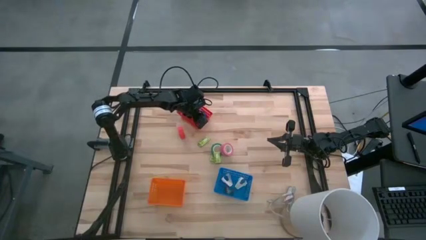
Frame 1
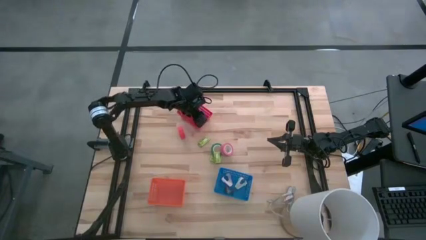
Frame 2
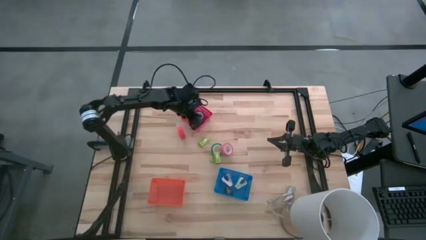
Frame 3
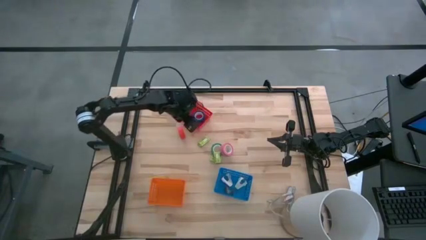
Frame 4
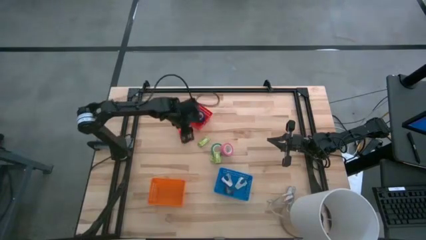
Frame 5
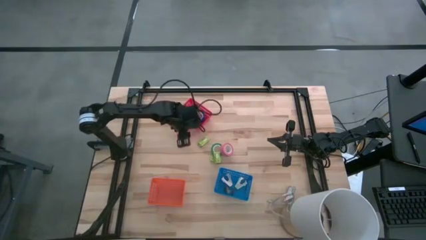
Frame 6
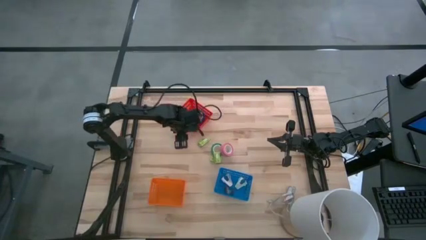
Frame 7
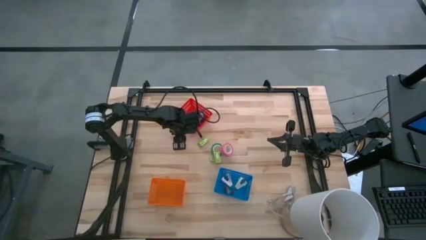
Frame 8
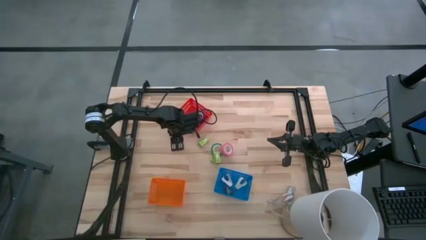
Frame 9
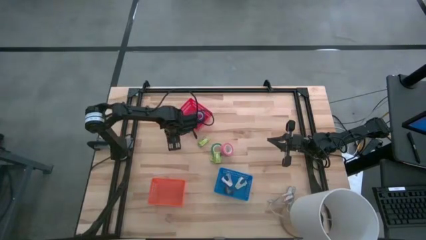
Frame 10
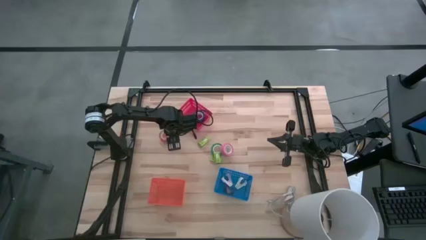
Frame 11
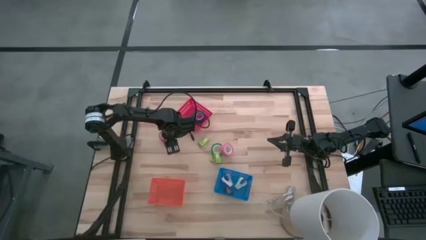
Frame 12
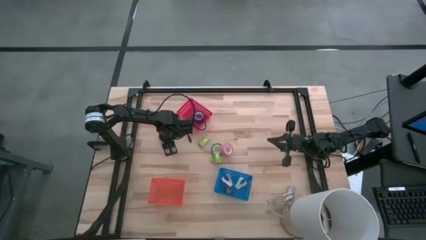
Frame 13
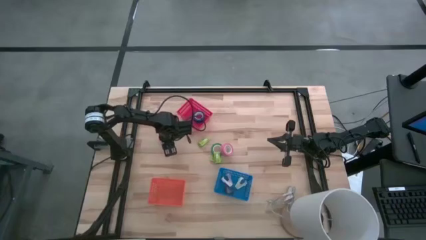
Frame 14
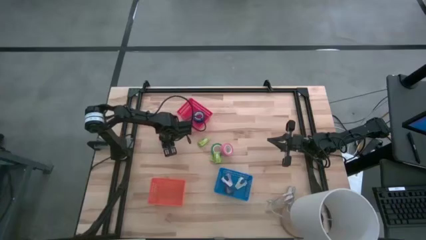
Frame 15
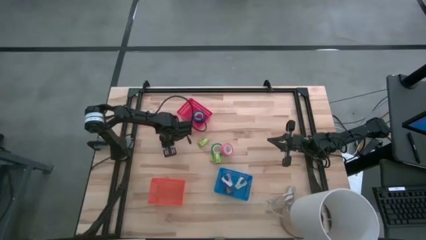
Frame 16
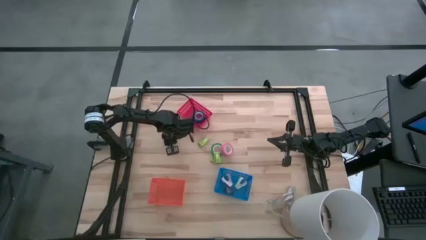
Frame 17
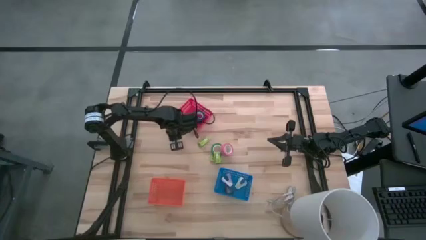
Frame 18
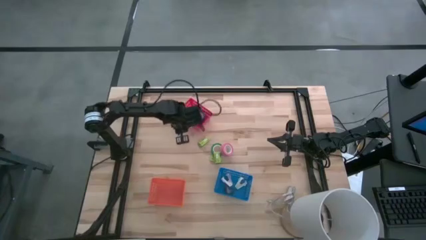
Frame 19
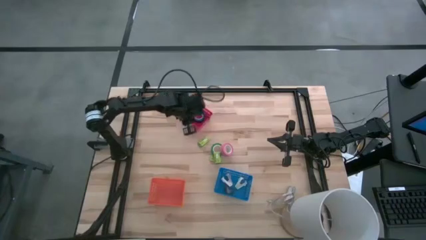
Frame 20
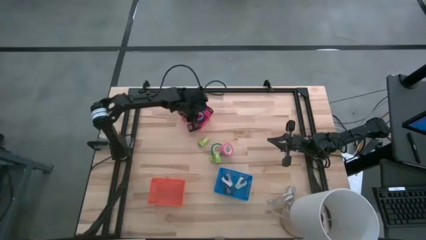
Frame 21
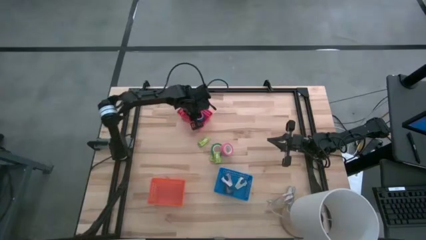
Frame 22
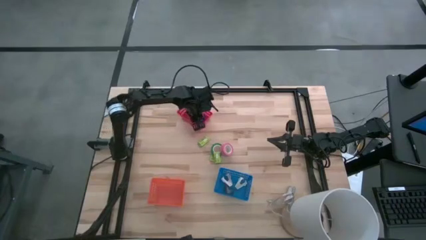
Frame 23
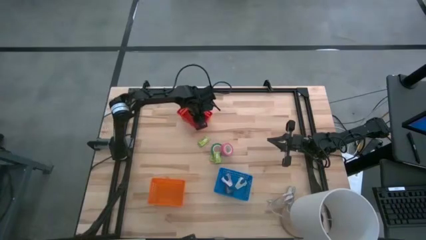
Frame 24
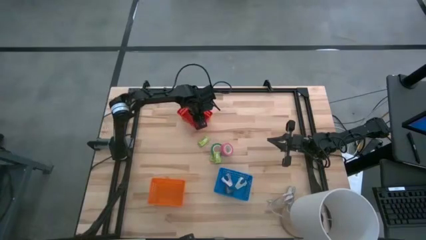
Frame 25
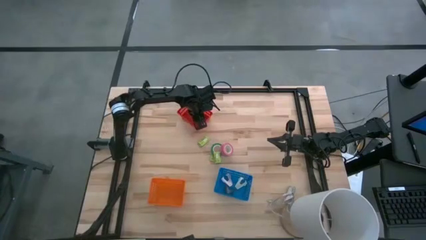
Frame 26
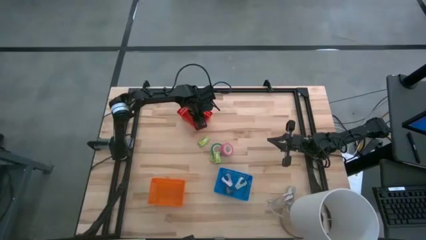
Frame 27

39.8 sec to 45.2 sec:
Task: Pick and place Stapler, Stapler remover, tape
Put the orange tape into the red bin

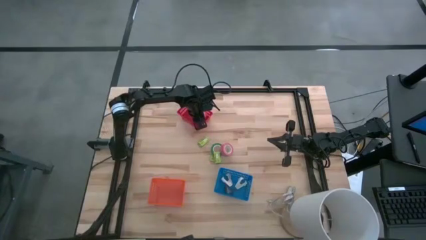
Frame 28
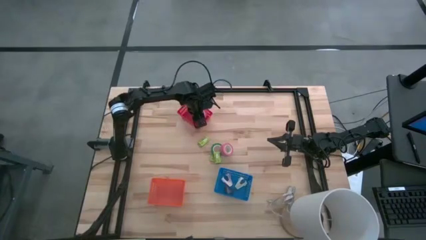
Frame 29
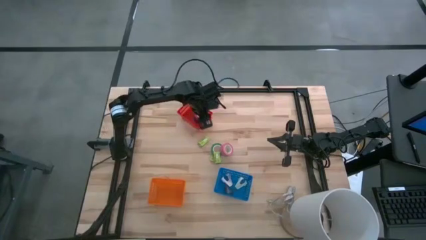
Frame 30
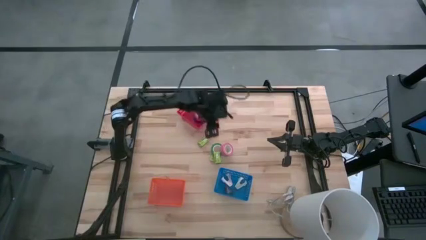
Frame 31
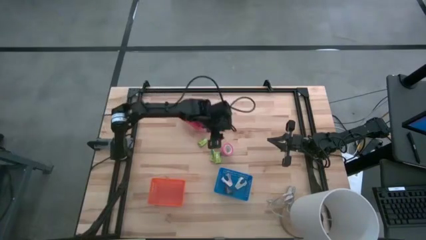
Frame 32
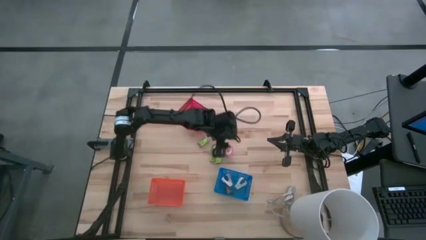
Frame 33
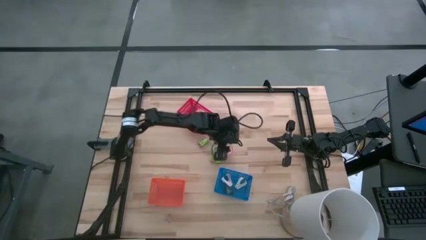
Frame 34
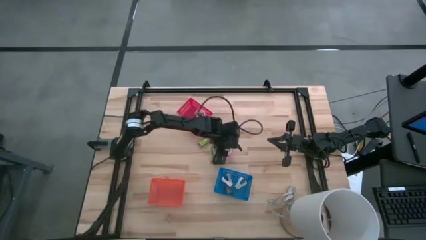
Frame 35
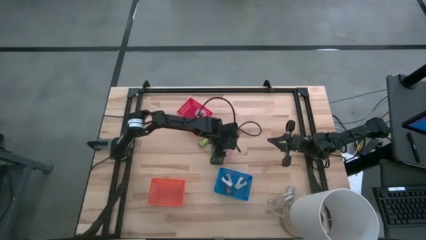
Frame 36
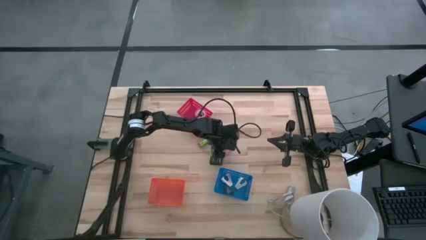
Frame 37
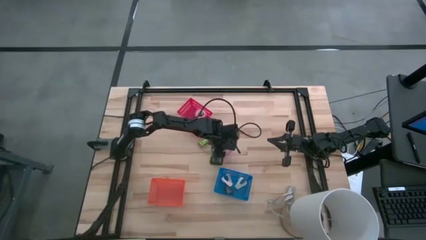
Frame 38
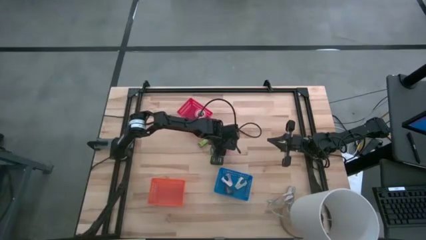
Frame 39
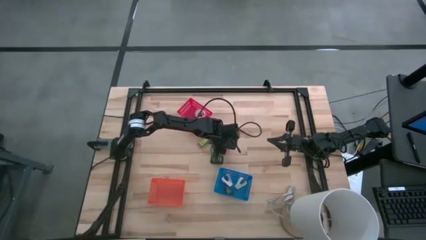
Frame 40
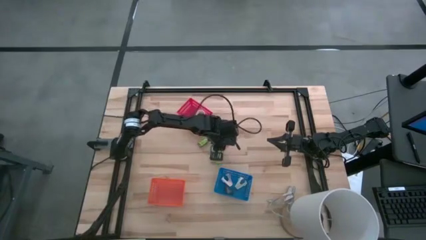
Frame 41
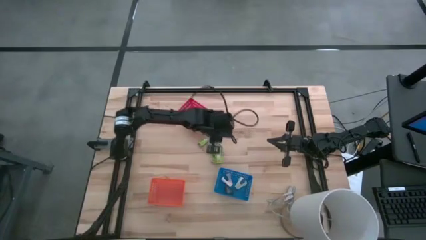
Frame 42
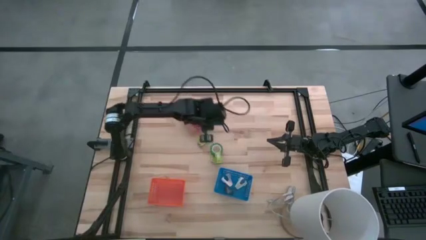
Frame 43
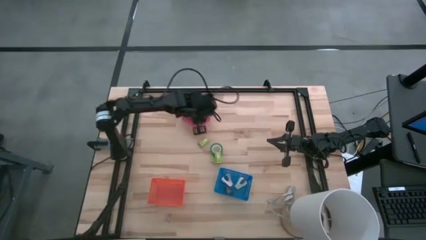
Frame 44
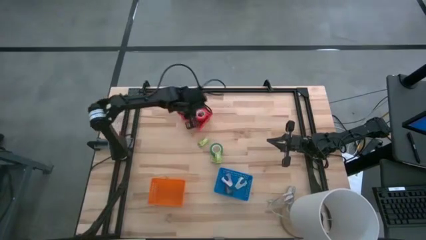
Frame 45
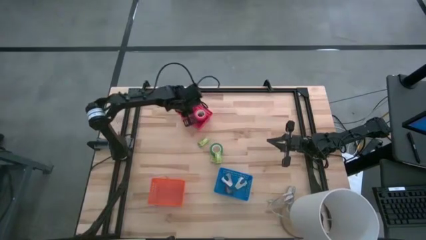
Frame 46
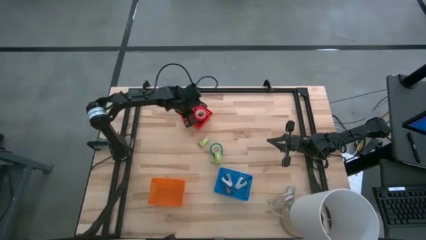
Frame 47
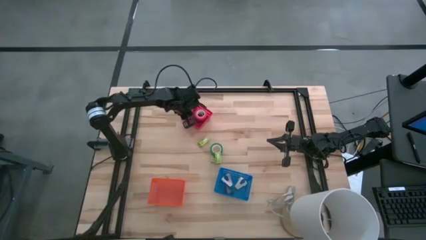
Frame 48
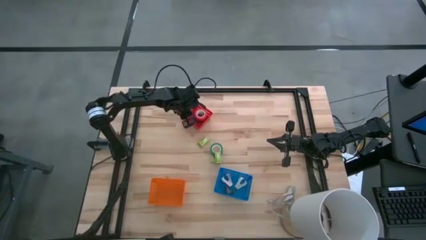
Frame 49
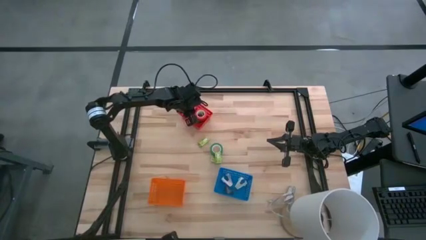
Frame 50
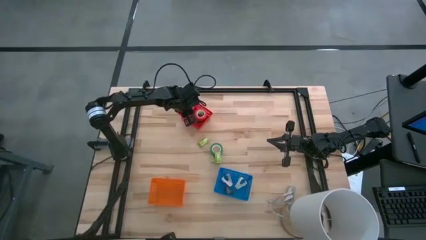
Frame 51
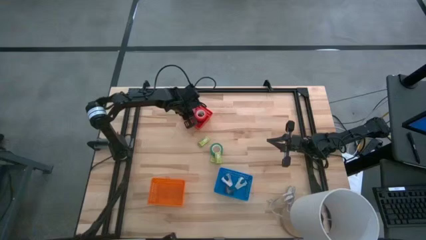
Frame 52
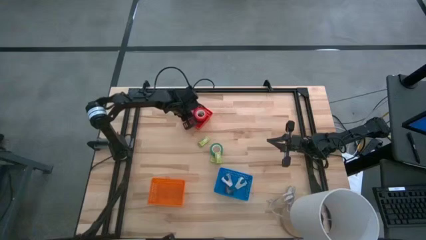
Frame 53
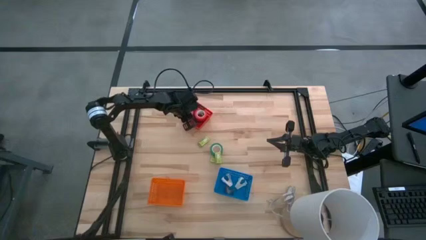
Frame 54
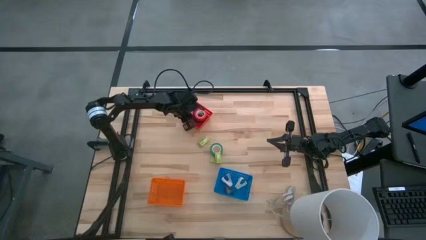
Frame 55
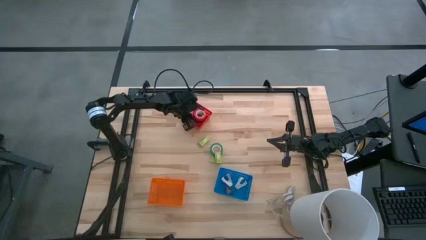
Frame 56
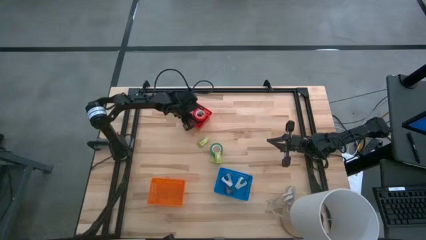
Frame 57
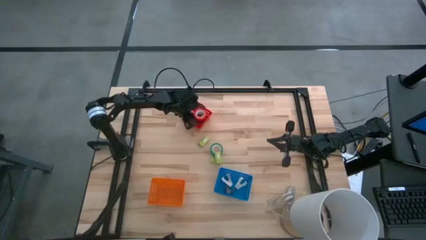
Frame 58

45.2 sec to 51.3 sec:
Put the pink tape into the red bin

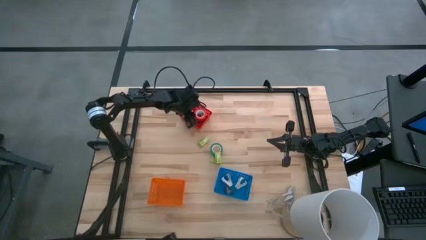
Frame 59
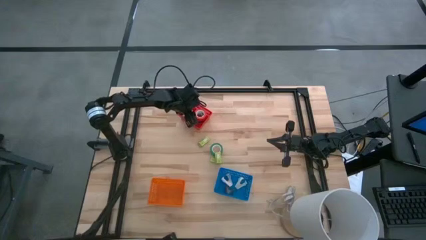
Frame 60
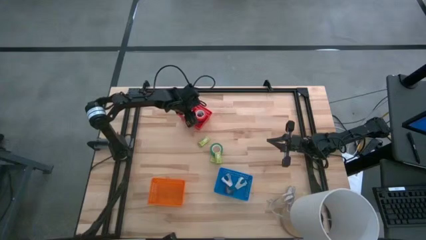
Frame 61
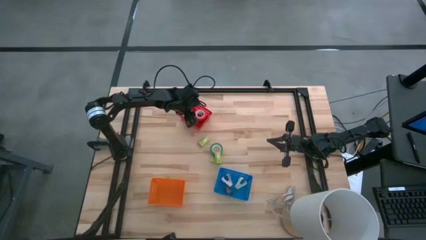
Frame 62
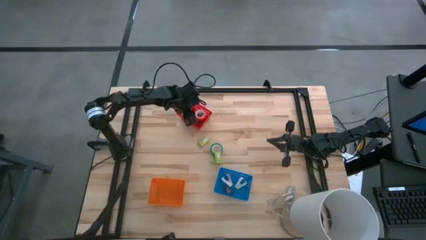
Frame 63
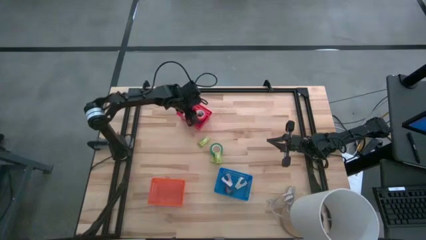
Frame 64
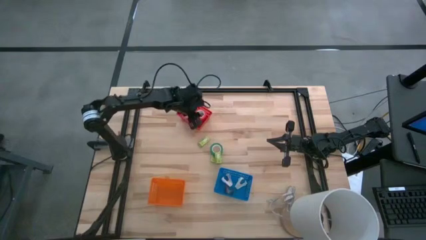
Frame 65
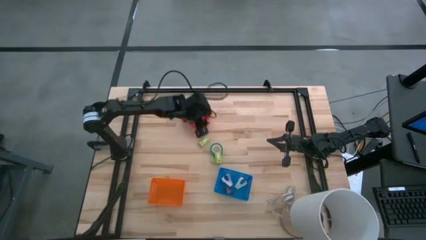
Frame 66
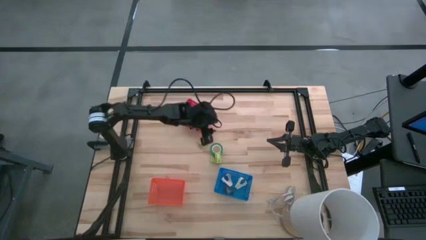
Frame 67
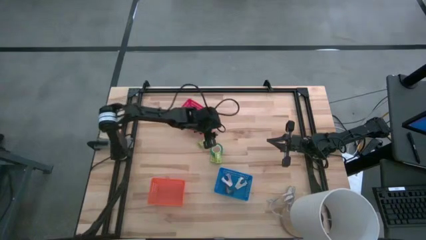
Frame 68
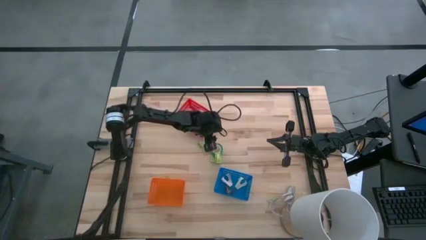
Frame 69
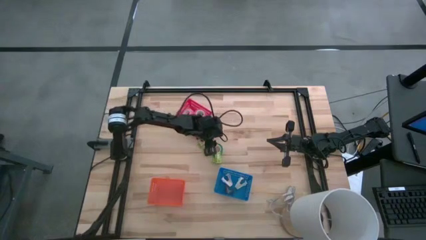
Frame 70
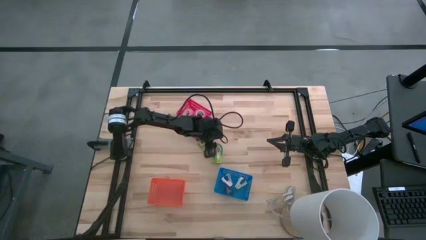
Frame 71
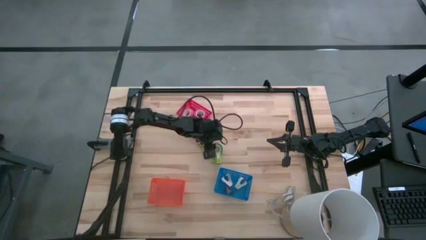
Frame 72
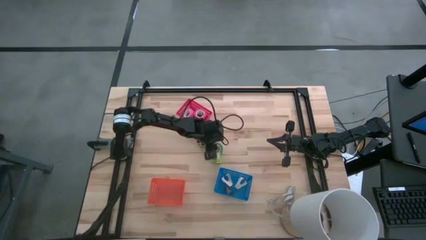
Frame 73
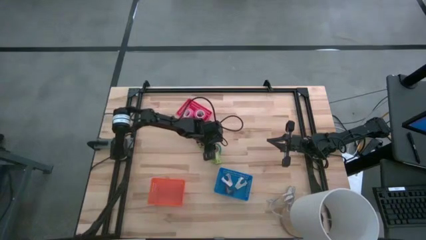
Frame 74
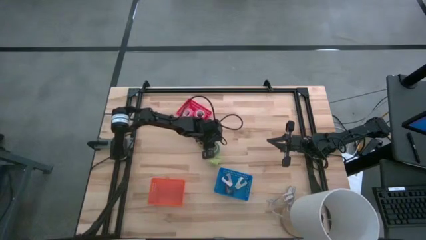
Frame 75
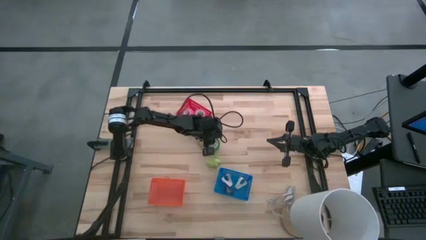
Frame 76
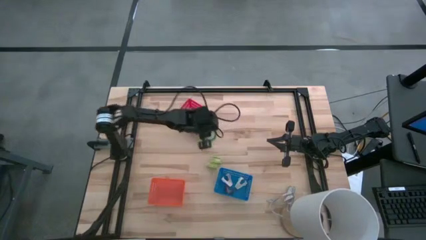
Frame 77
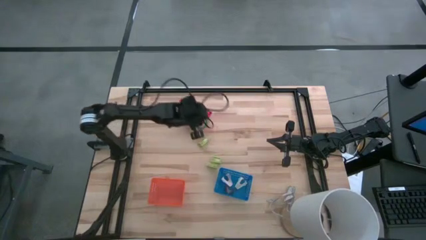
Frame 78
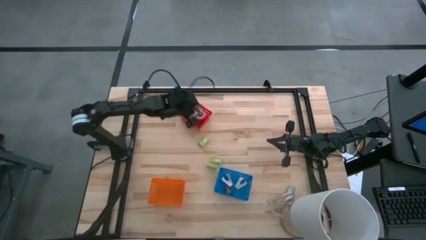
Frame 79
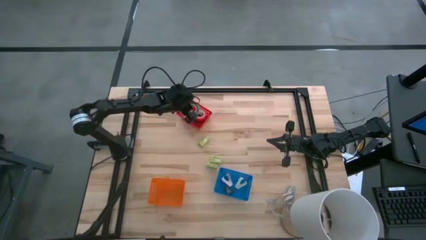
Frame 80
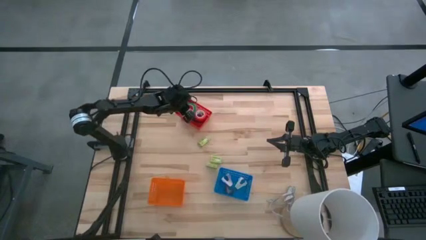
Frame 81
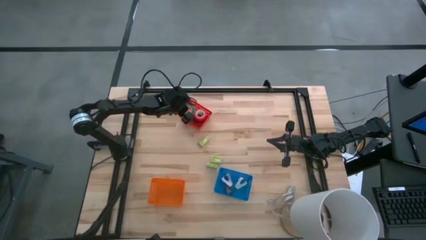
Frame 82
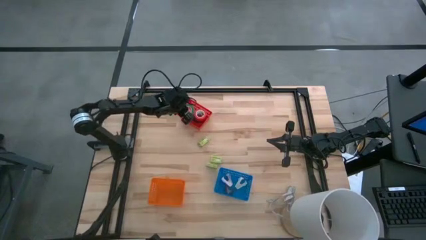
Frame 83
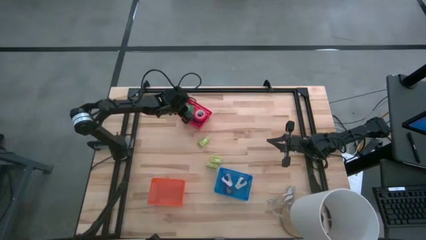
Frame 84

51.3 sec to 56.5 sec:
Put the green tape into the red bin
